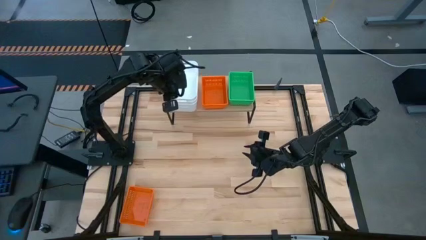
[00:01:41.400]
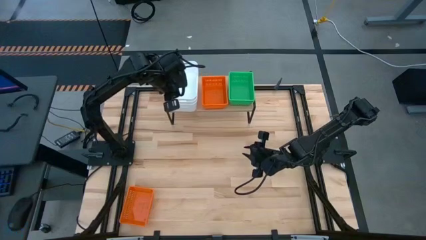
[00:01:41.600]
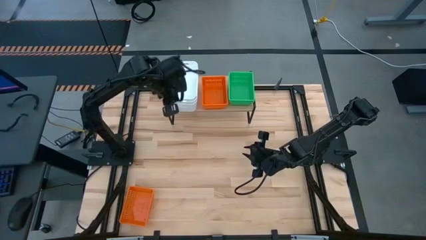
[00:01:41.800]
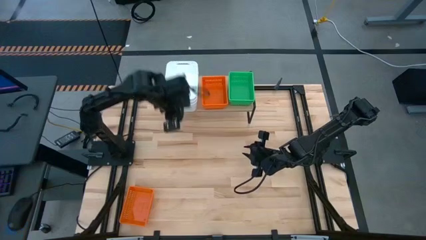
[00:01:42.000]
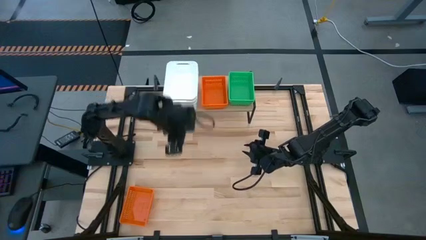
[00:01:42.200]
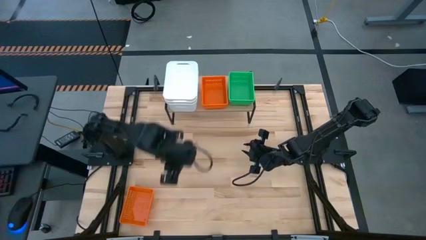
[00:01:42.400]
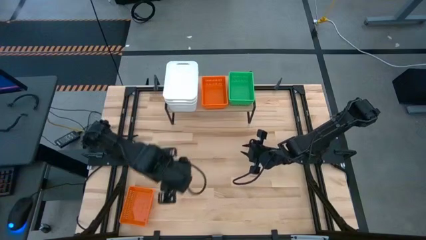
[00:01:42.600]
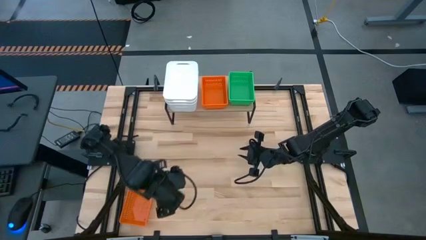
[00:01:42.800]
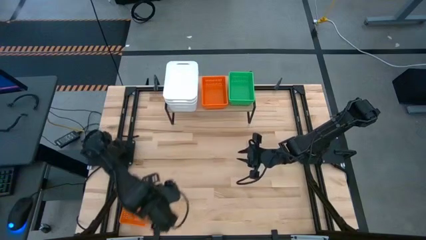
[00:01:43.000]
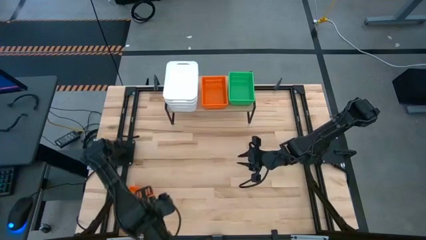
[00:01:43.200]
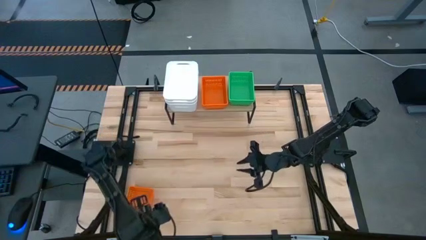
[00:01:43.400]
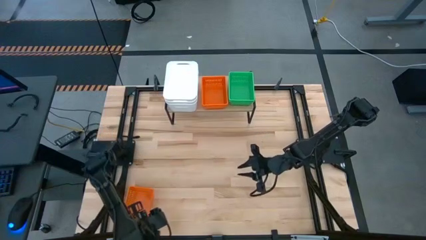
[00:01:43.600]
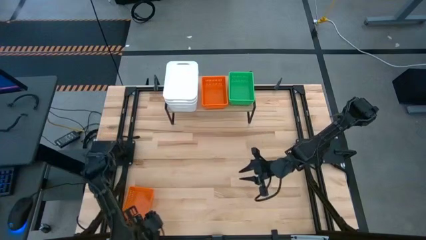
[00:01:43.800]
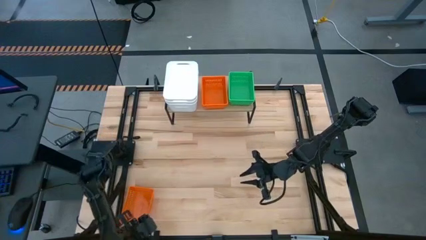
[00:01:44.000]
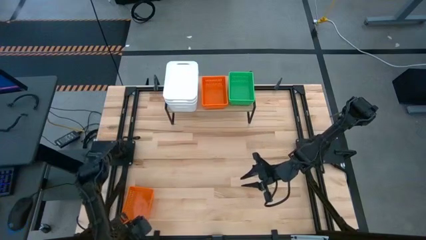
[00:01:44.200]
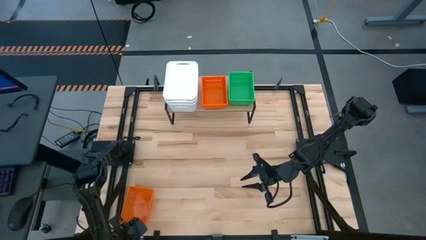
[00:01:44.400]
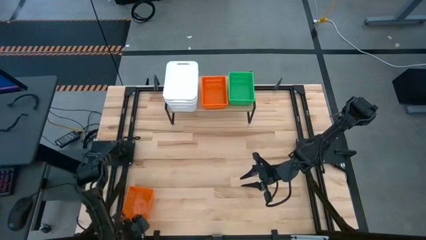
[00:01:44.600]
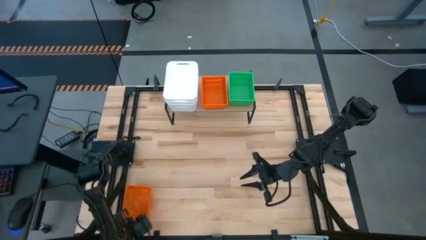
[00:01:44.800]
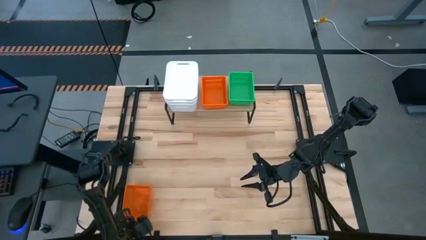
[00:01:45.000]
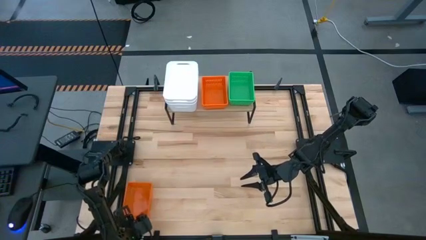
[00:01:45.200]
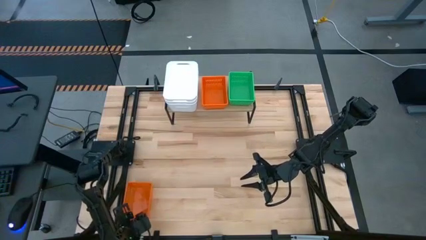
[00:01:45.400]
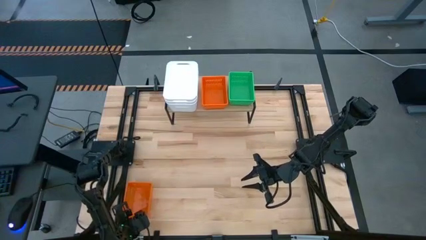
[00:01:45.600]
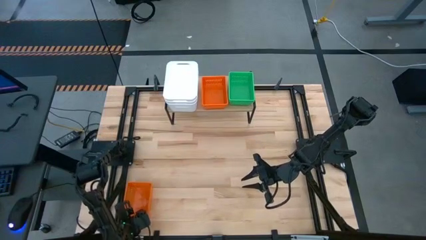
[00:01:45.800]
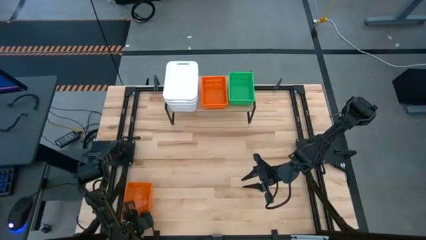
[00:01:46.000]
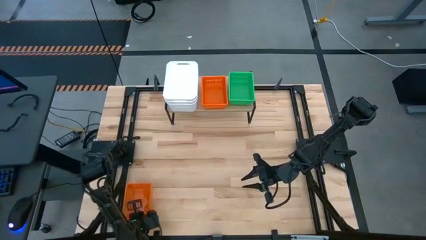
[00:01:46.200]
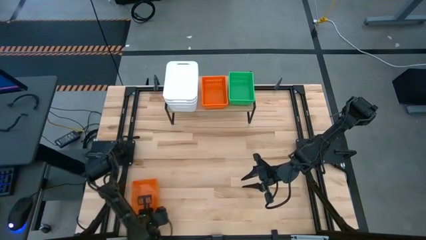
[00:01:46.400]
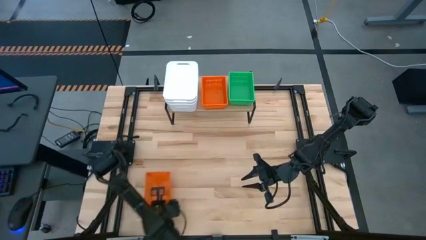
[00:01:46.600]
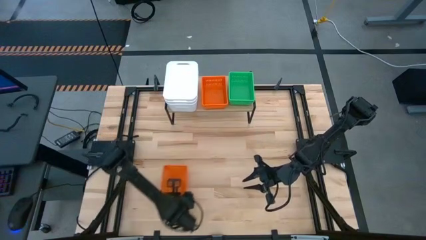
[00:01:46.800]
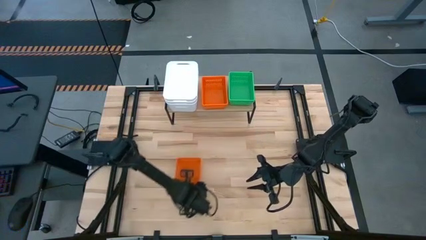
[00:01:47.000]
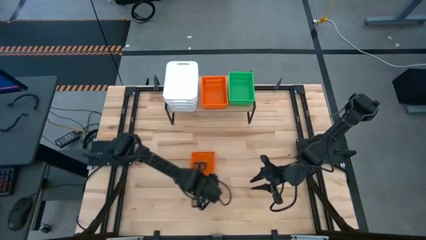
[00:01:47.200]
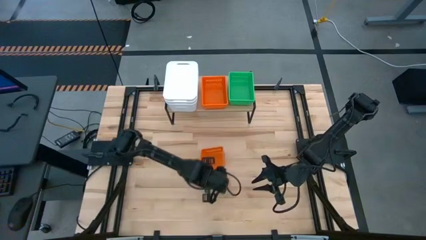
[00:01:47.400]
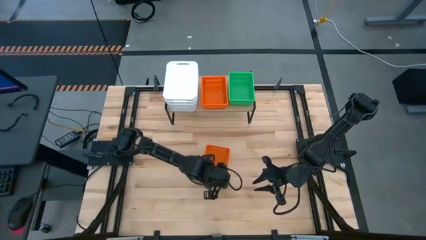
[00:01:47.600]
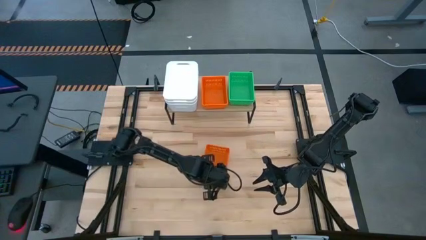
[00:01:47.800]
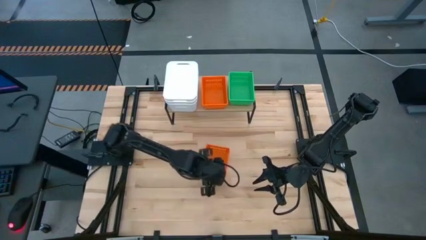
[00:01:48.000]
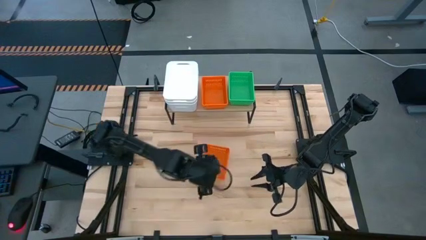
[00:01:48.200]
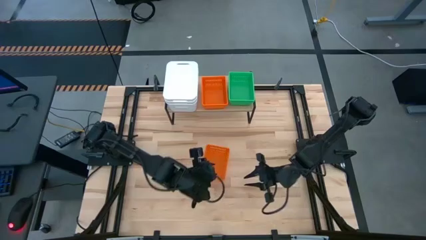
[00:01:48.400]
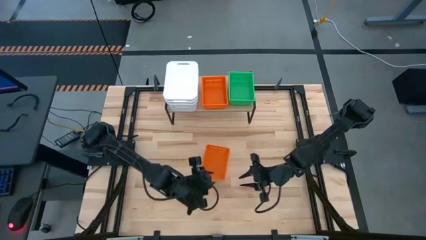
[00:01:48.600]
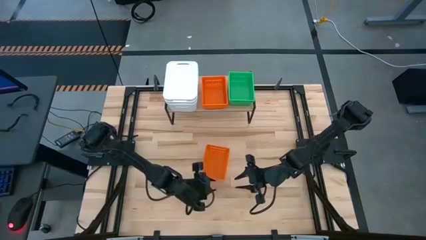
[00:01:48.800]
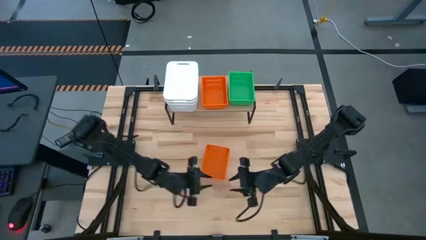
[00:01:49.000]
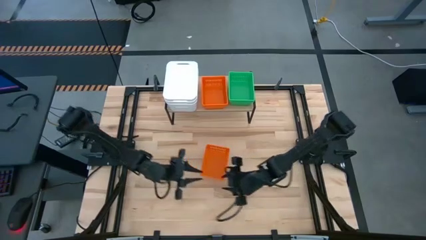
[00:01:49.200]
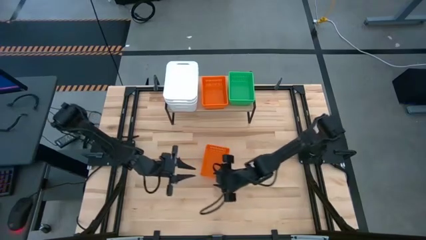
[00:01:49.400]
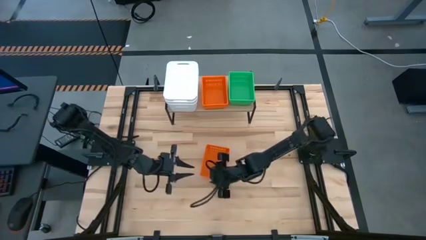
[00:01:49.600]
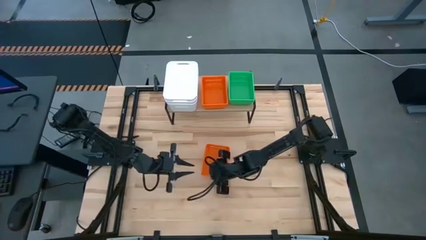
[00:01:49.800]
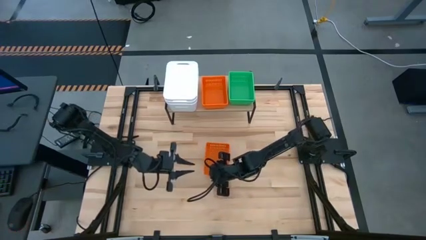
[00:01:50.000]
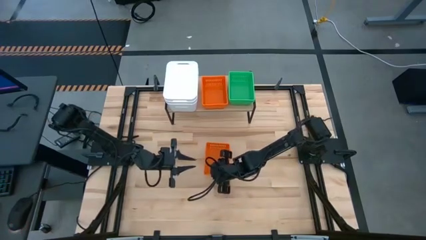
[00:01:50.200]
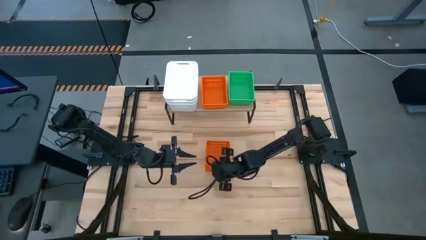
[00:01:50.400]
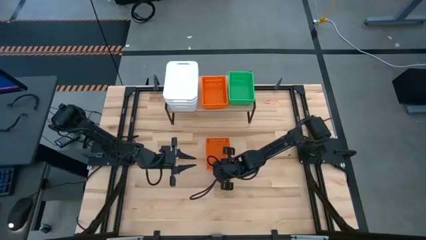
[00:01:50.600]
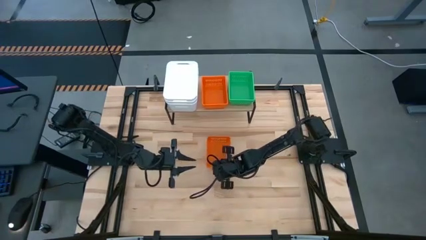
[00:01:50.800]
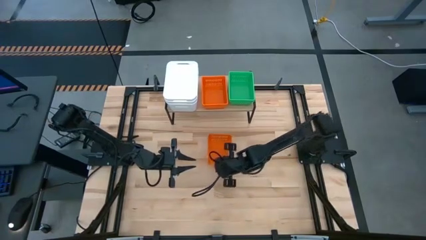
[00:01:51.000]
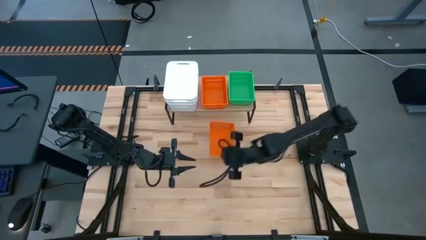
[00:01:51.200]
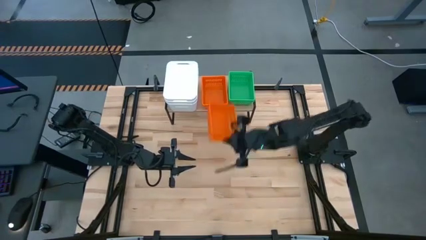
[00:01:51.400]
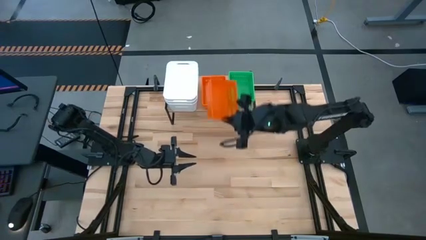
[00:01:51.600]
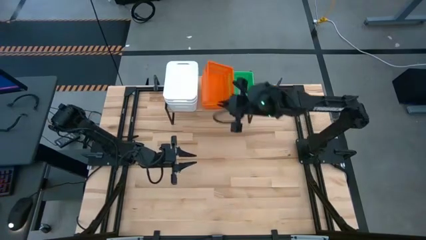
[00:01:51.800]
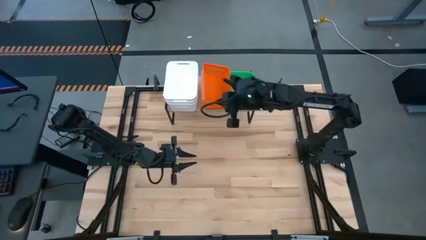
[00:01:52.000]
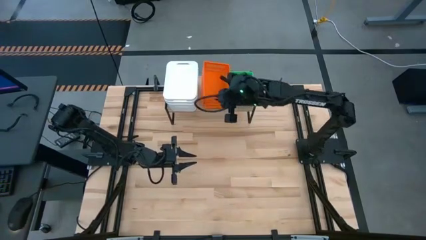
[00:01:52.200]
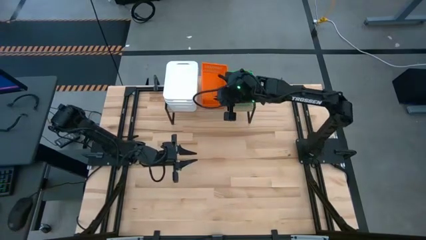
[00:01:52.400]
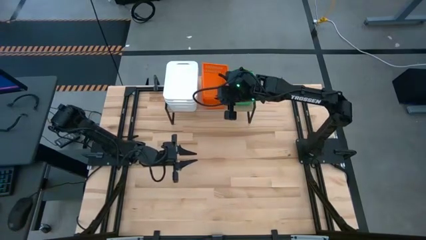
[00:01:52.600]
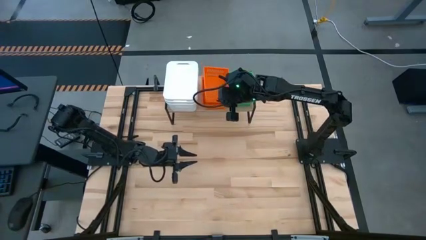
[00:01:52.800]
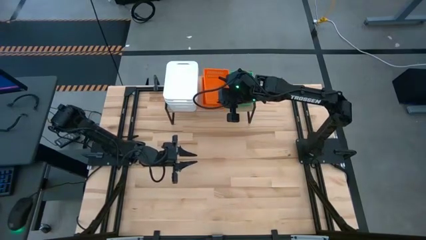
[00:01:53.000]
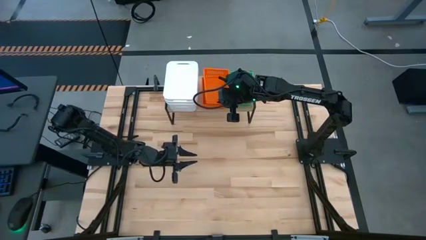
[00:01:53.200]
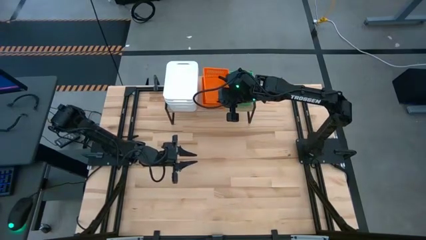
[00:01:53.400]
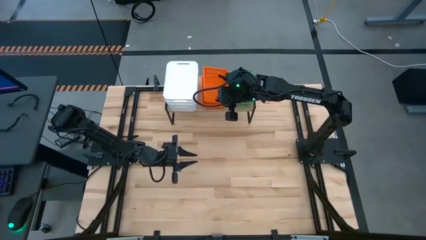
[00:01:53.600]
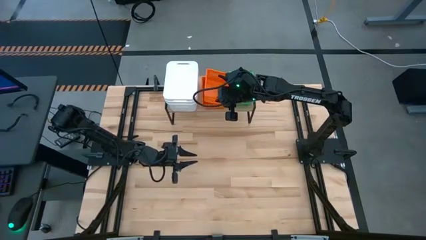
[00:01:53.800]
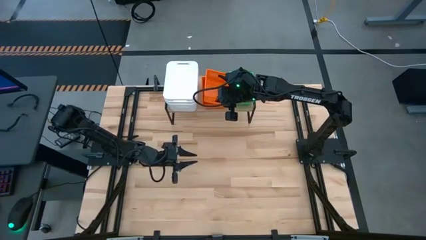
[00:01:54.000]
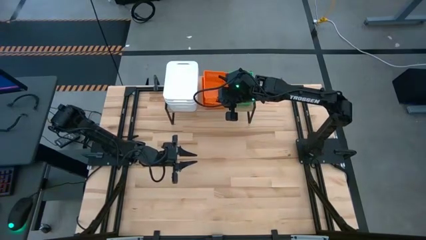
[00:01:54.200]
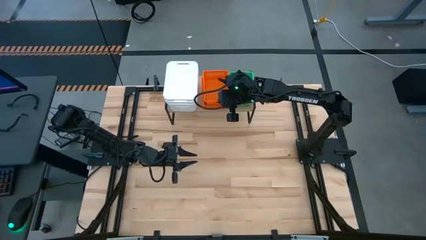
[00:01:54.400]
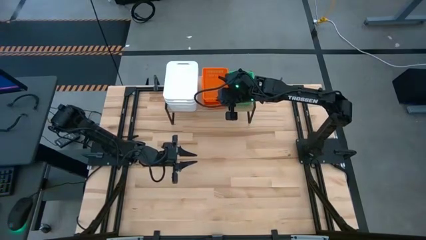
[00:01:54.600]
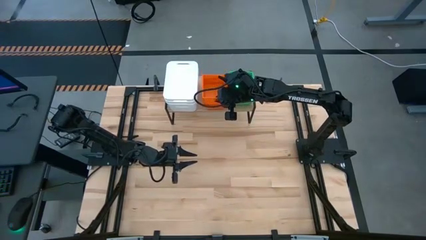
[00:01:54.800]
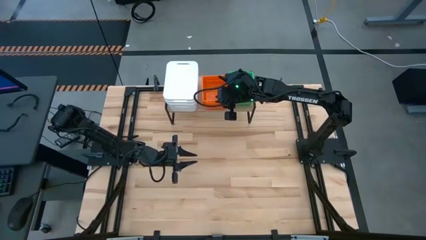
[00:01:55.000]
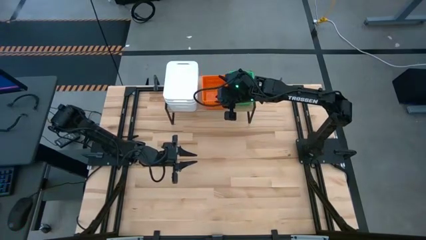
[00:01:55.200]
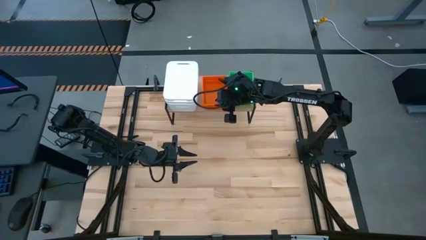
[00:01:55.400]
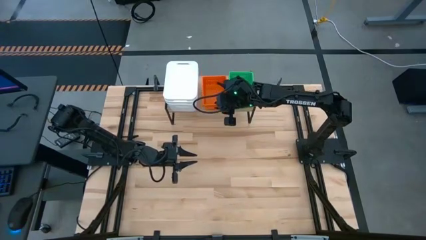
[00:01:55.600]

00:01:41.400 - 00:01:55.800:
Task: Stack baskets on shelf by color
Stack the orange bin on top of the orange bins on the shelf

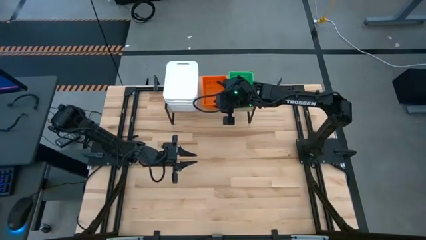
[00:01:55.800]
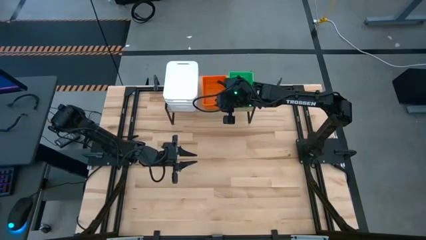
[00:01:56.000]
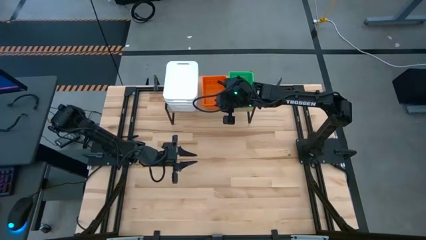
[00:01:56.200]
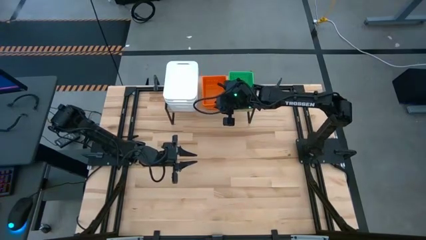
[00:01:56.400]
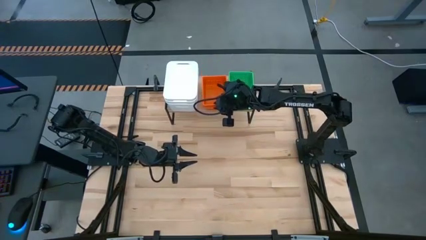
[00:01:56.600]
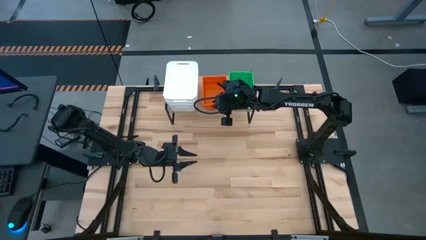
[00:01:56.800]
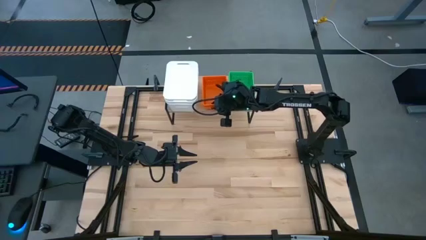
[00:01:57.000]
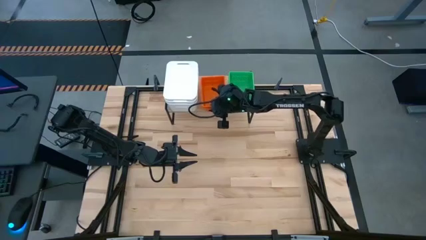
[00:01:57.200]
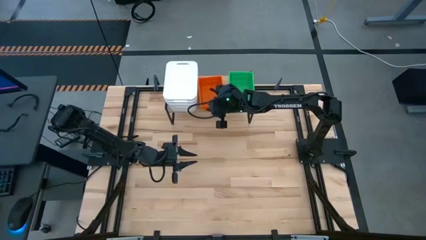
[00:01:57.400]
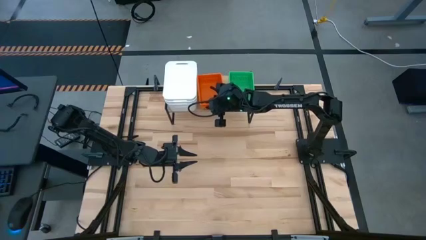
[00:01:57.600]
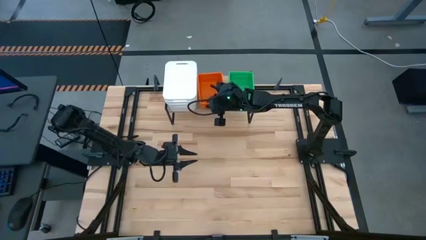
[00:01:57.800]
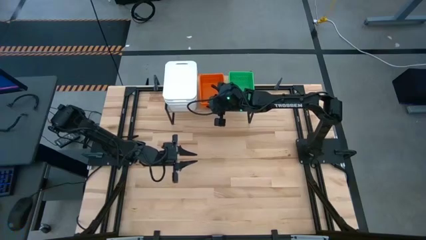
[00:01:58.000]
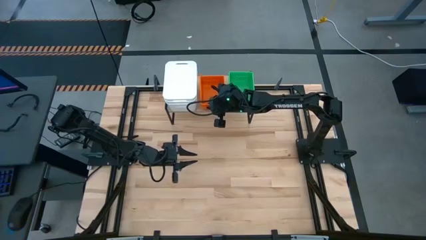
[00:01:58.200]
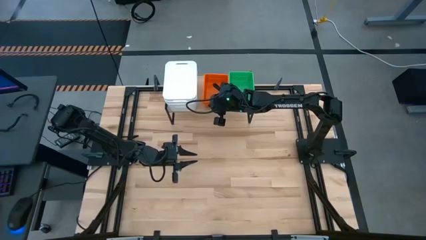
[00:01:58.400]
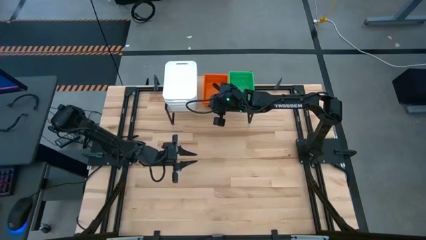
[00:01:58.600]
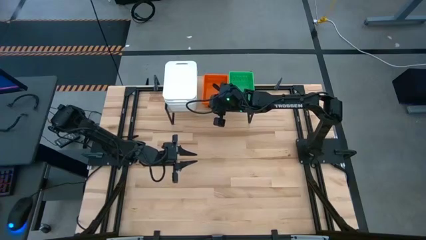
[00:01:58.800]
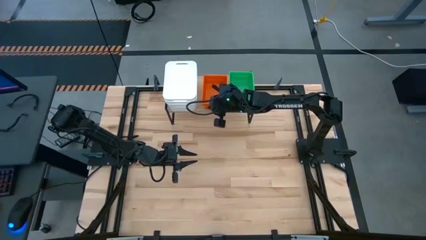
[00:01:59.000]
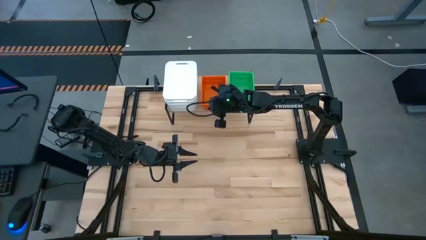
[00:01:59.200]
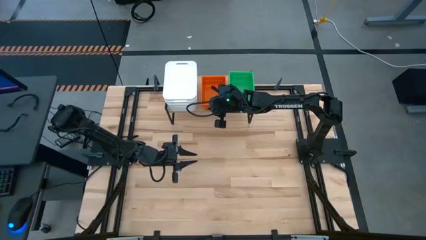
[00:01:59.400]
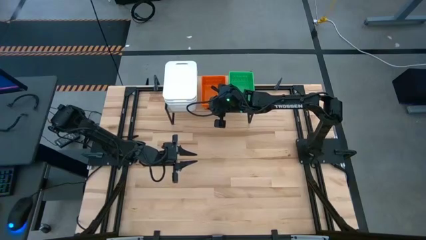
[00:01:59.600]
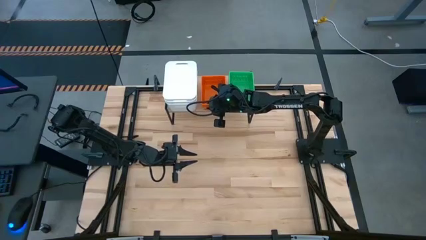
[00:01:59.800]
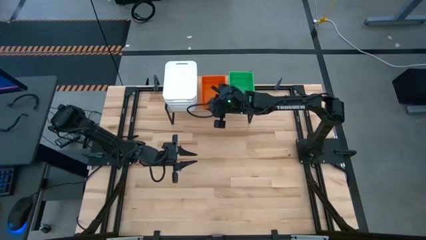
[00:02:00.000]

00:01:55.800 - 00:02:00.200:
Adjust the stacked orange bins
